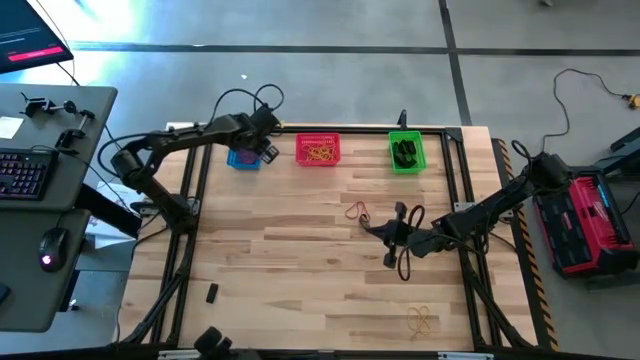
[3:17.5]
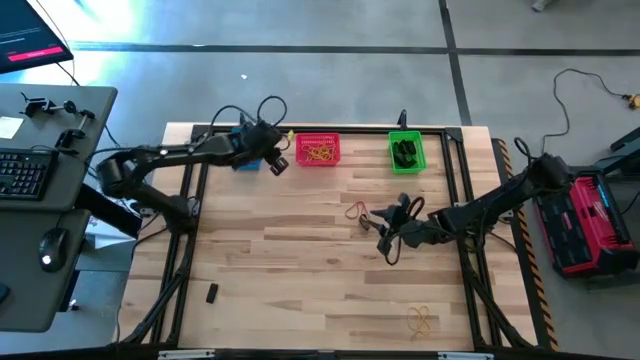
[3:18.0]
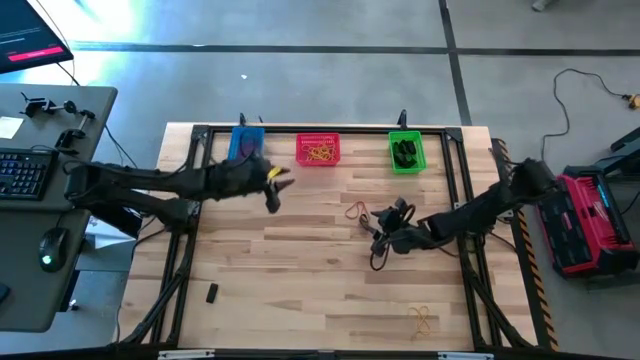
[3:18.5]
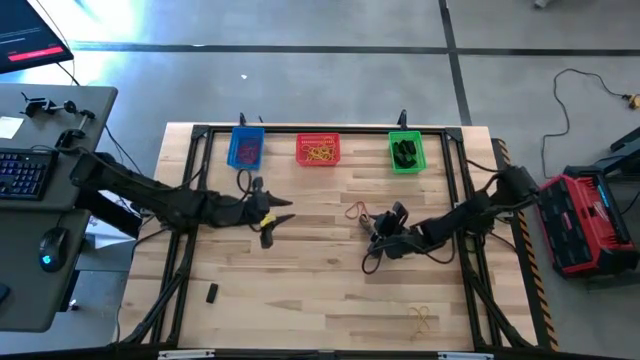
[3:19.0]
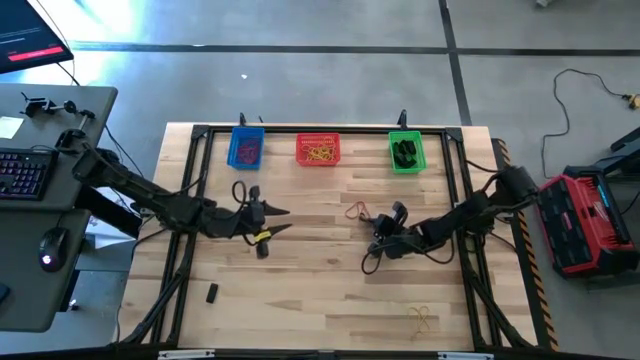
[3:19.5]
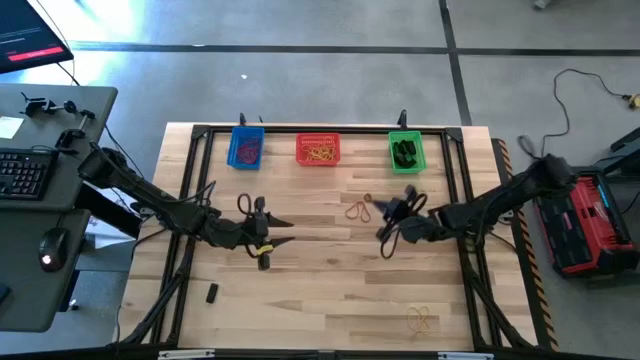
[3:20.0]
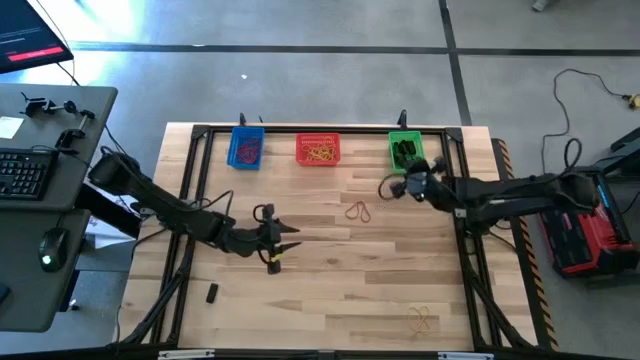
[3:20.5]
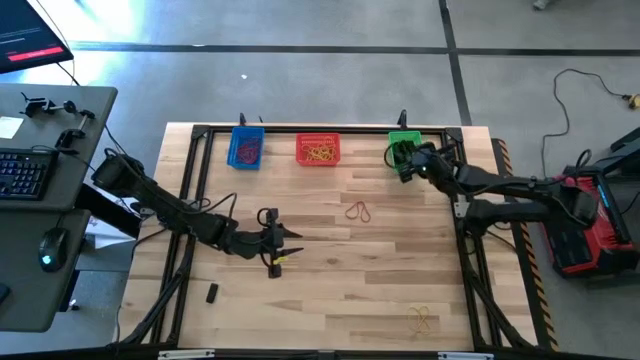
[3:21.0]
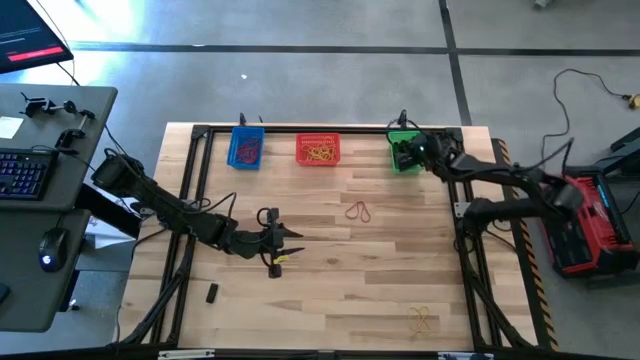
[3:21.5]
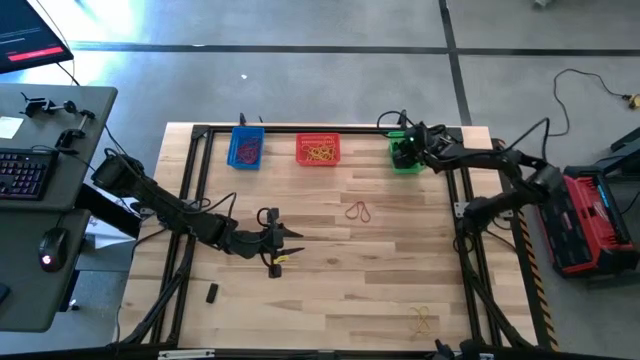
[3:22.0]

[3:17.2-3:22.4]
Task: Sort rubber bands into baskets
Put the black rubberband into the green bin

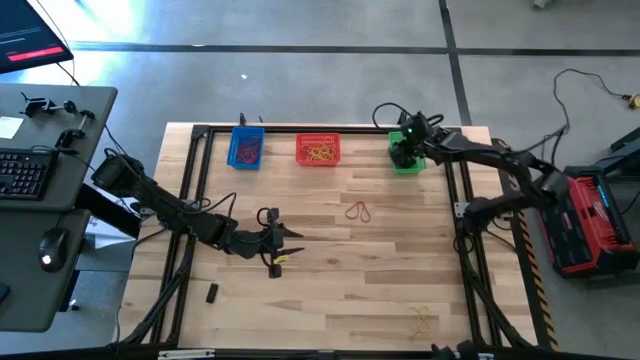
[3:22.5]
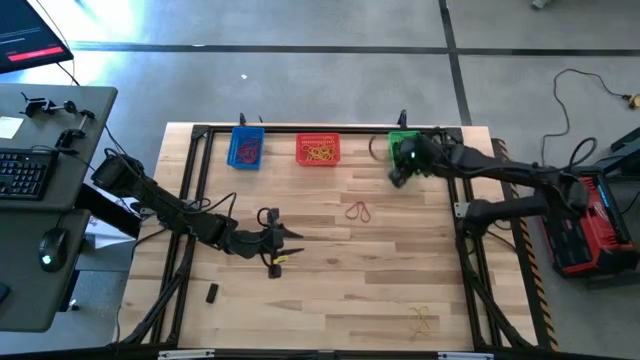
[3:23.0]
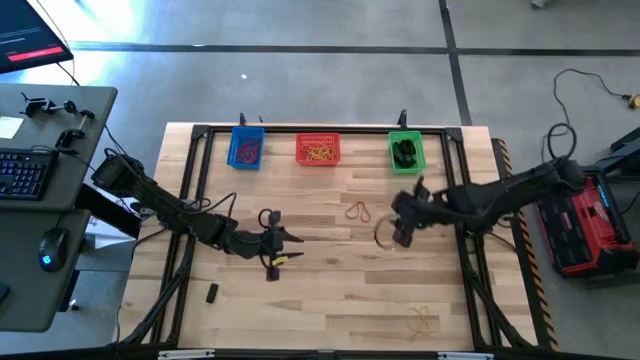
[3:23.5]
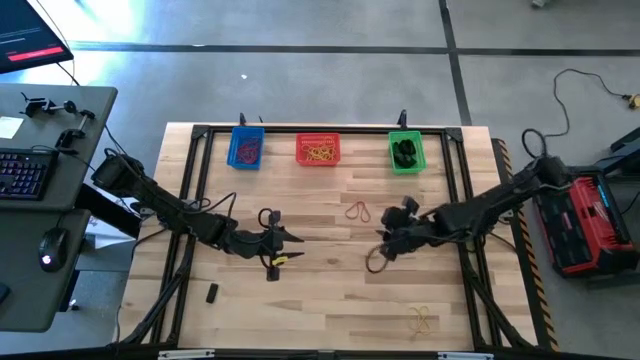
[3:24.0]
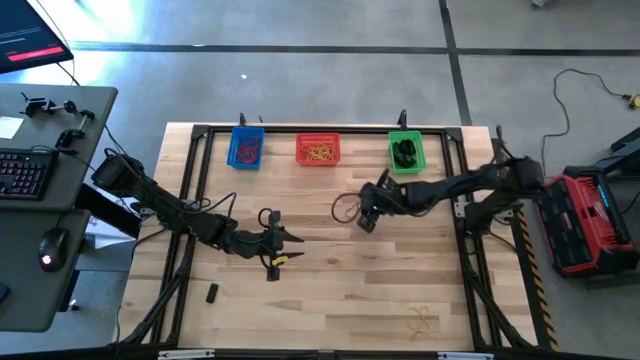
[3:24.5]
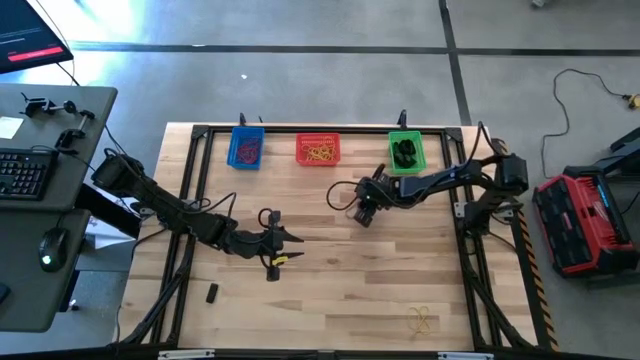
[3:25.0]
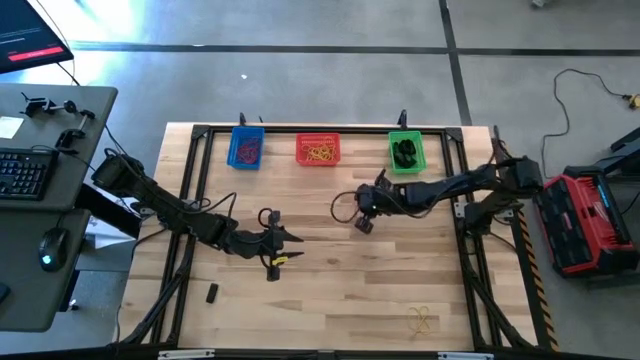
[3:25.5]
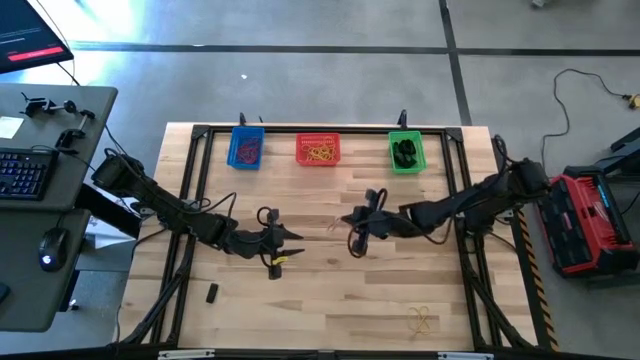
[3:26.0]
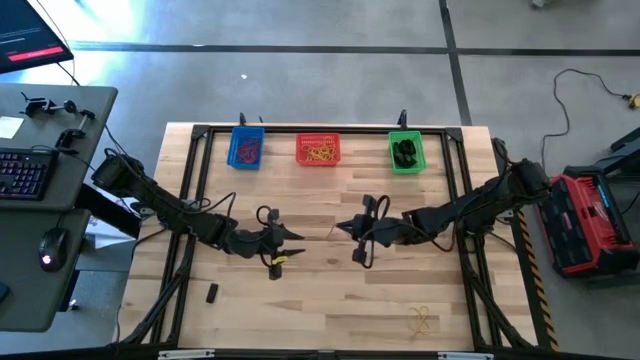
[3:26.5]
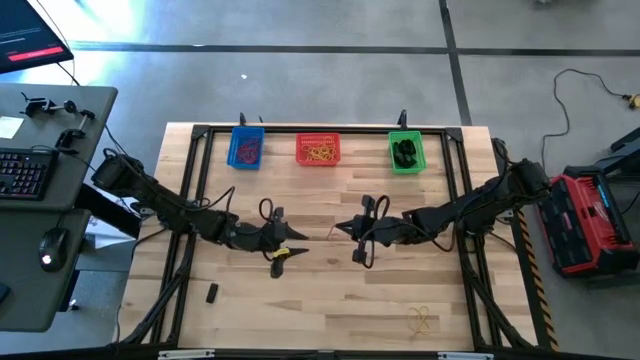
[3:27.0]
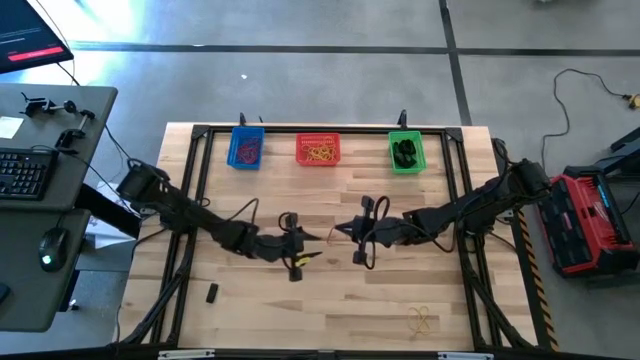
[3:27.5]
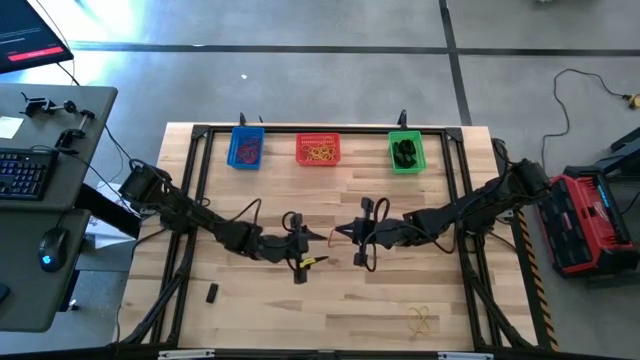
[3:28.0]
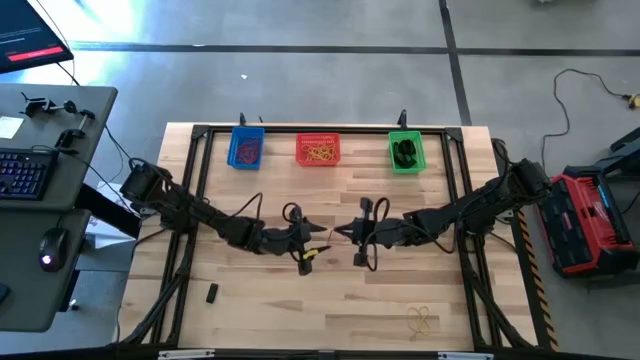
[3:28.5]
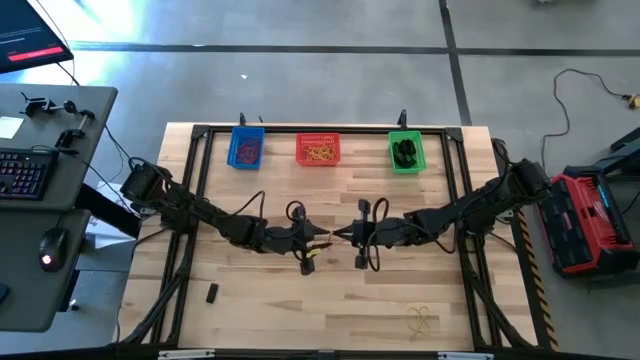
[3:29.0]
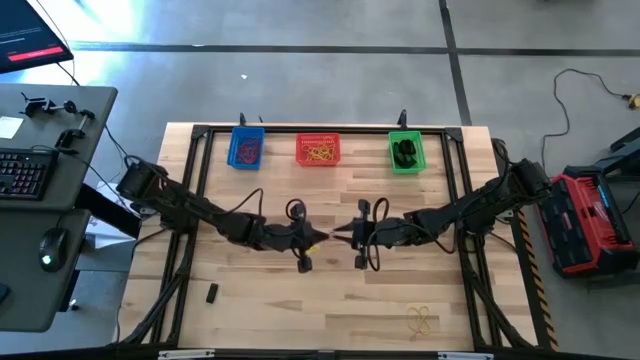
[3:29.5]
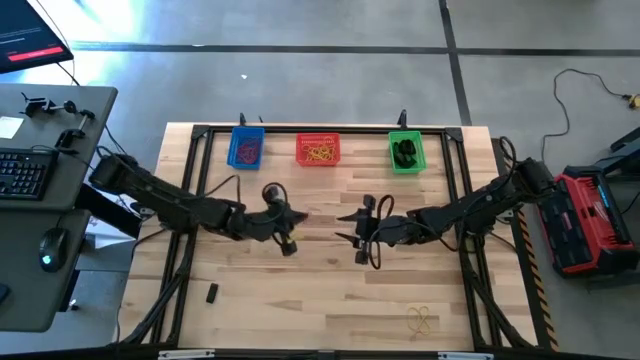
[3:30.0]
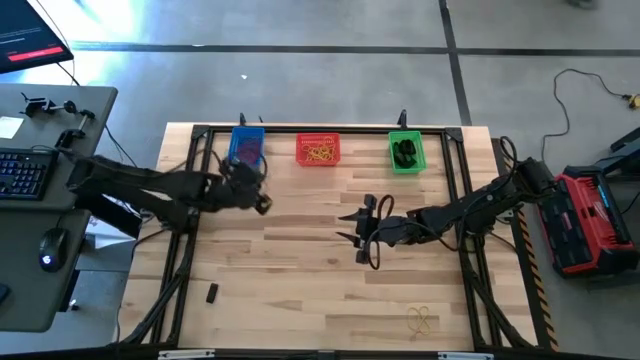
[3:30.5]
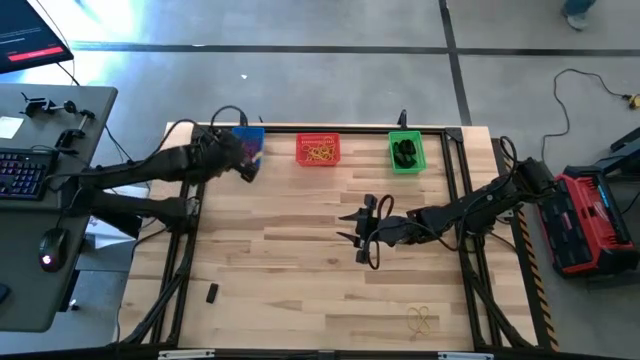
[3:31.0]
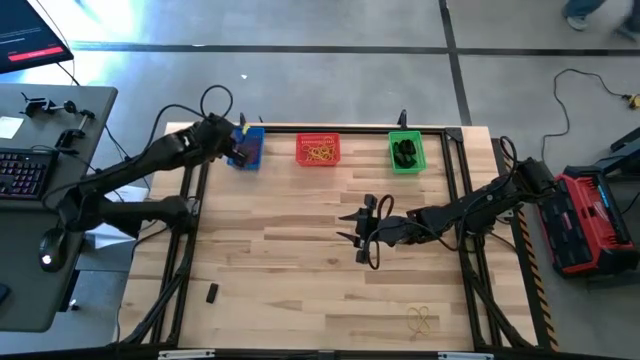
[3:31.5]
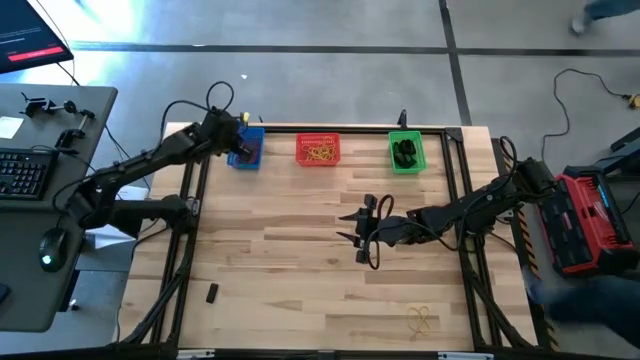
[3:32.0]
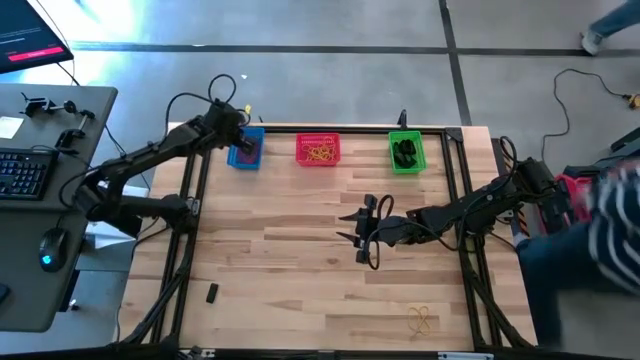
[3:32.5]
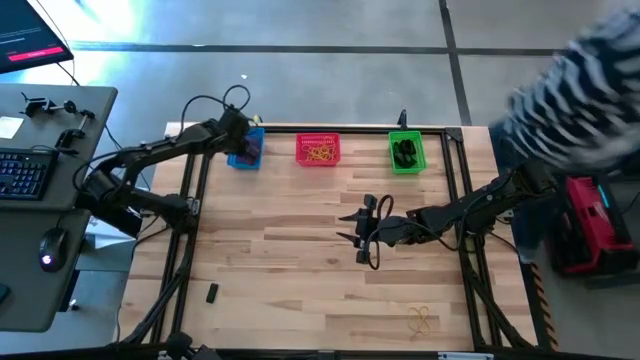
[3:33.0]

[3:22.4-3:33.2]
Put the orange rubberband into the blue bin

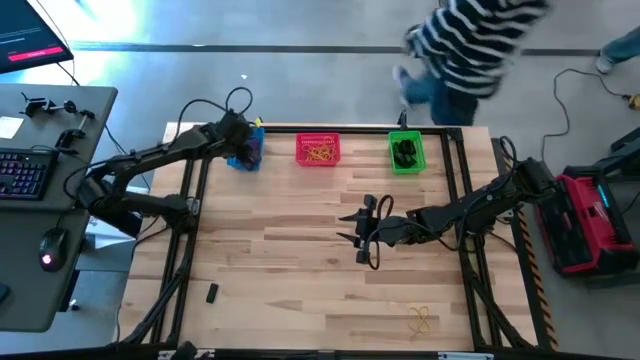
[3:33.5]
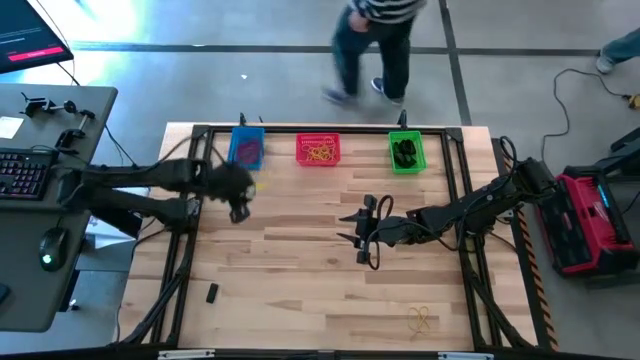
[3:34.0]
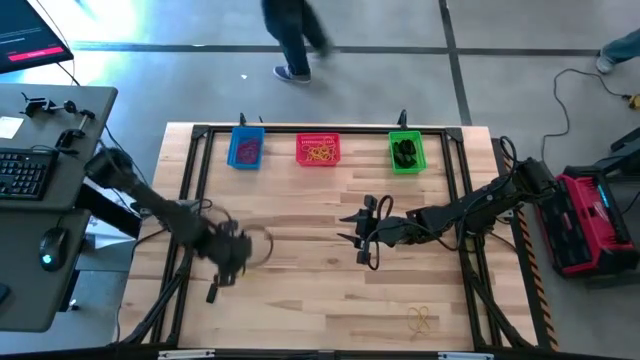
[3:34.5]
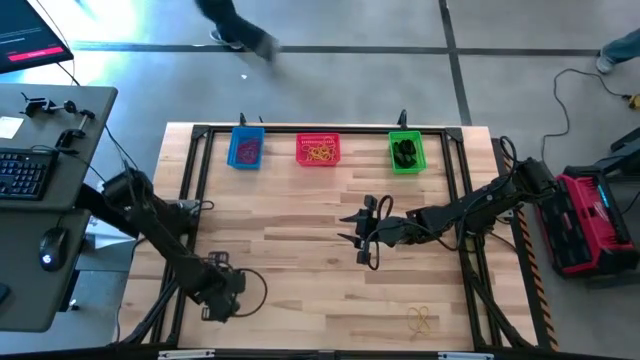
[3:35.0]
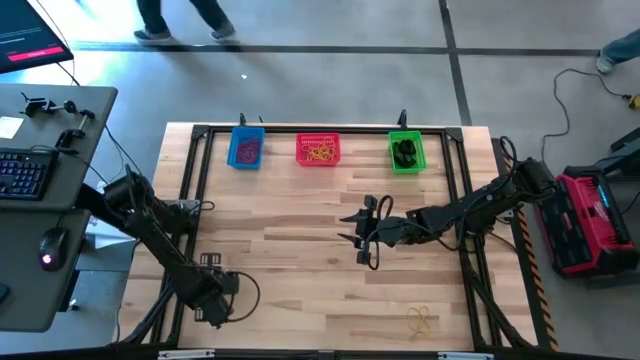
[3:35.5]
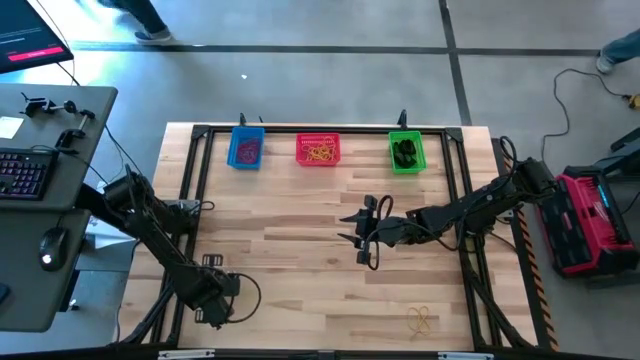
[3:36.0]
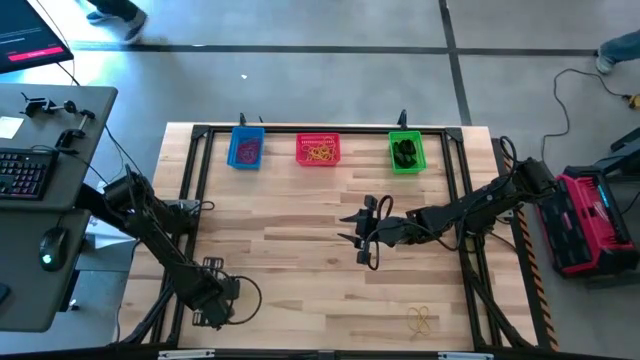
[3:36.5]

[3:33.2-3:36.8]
Put the black rubberband into the green bin
